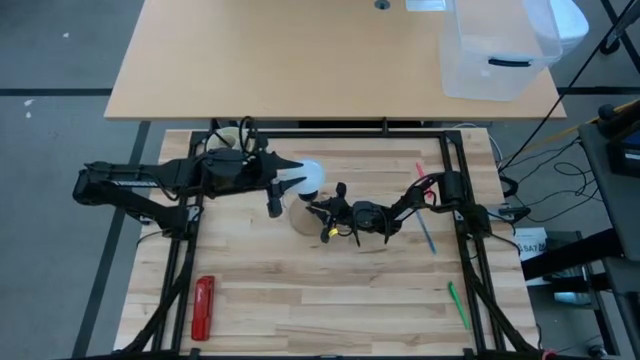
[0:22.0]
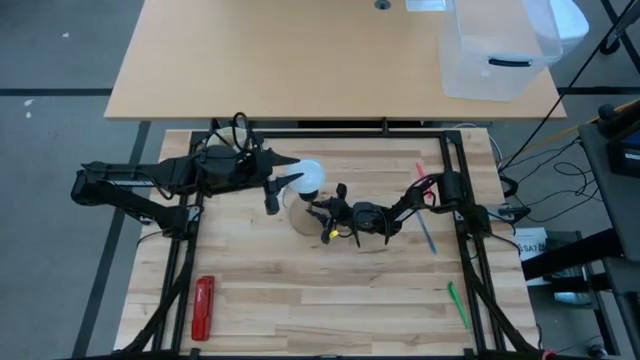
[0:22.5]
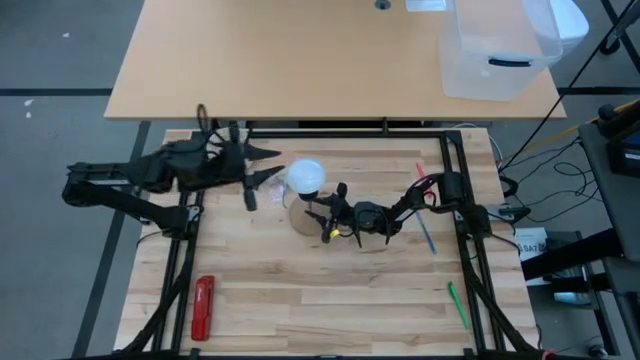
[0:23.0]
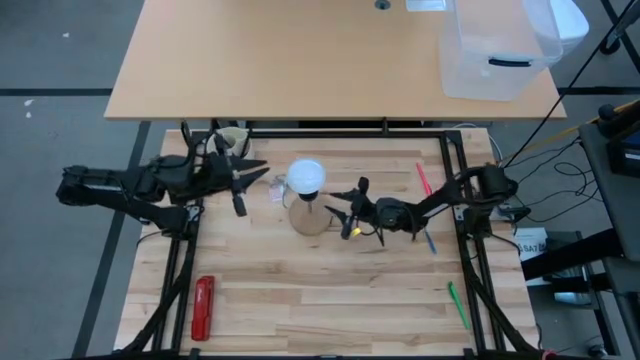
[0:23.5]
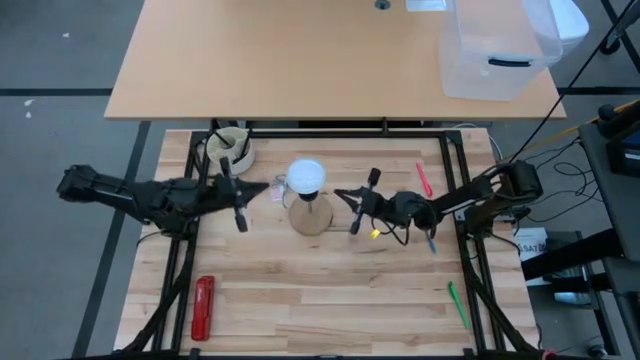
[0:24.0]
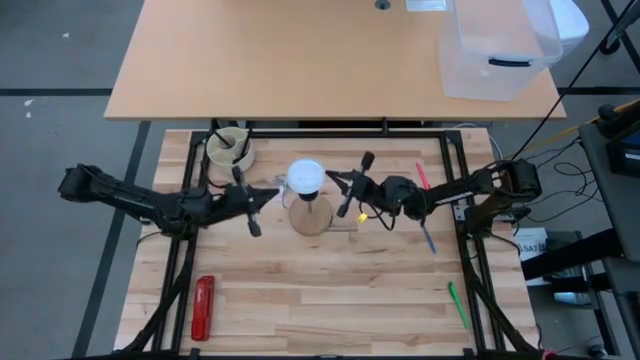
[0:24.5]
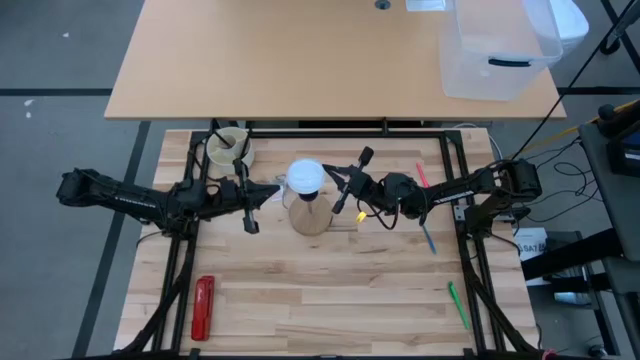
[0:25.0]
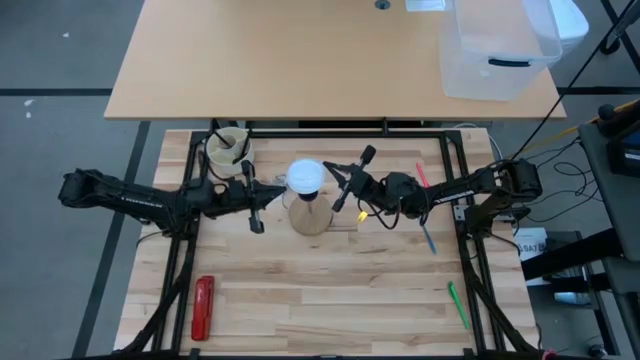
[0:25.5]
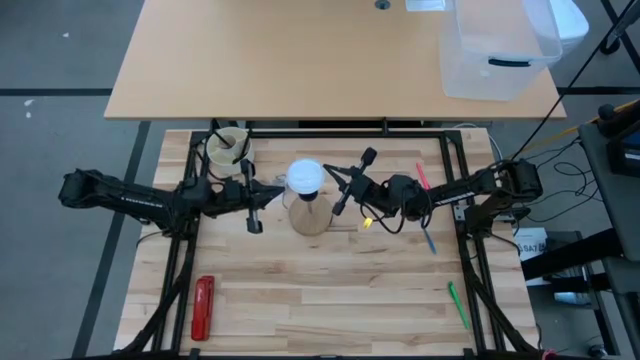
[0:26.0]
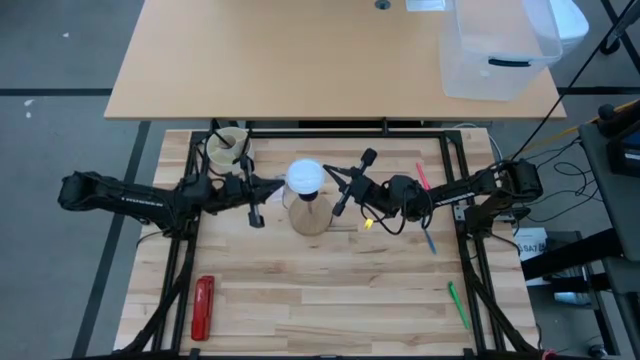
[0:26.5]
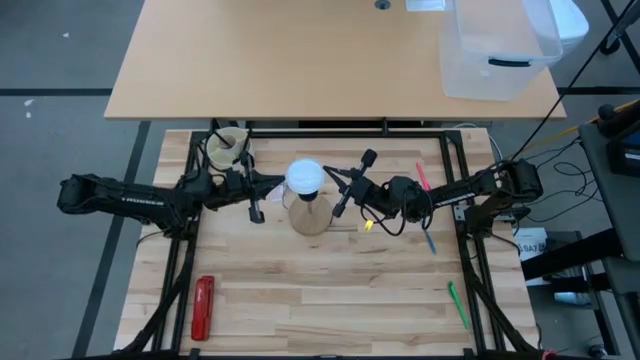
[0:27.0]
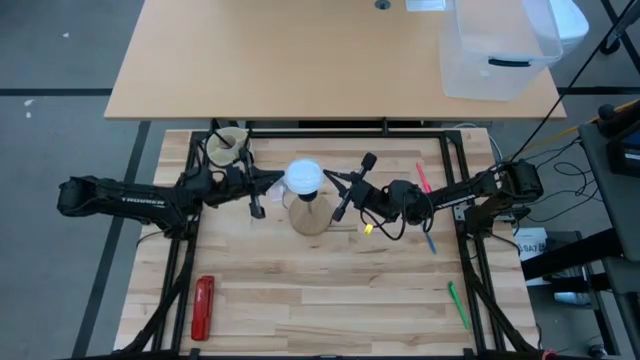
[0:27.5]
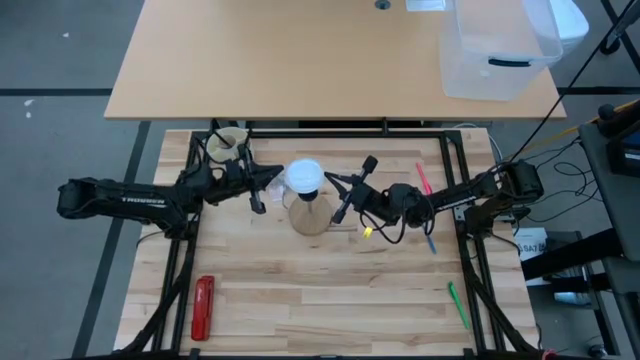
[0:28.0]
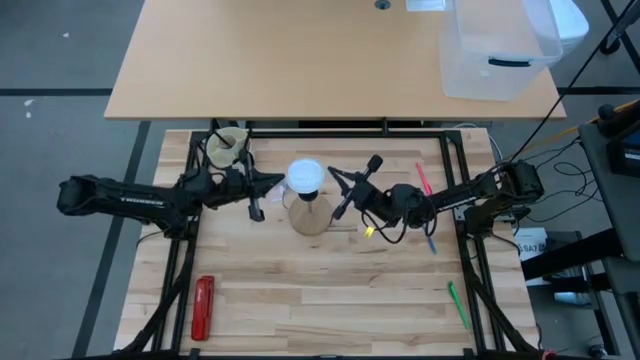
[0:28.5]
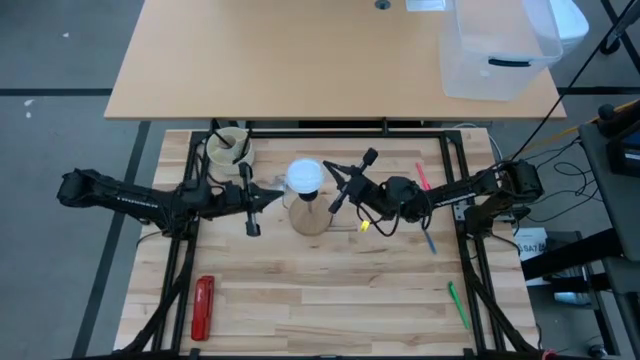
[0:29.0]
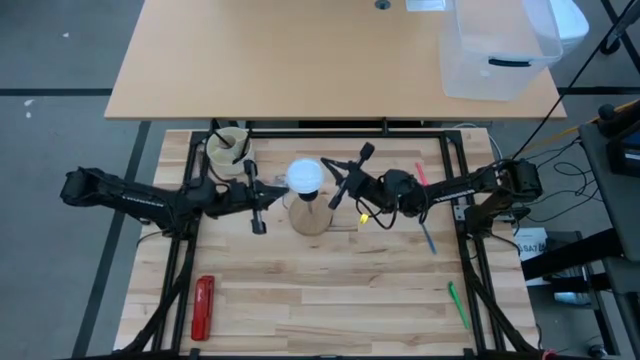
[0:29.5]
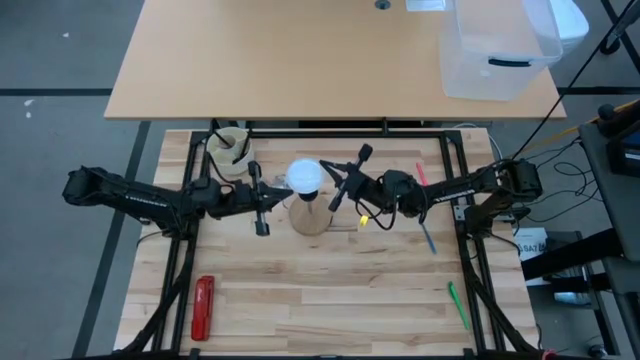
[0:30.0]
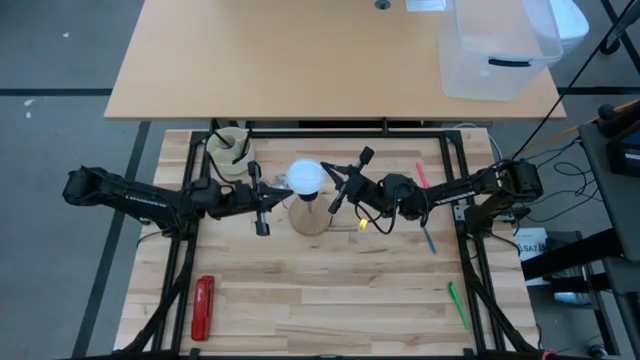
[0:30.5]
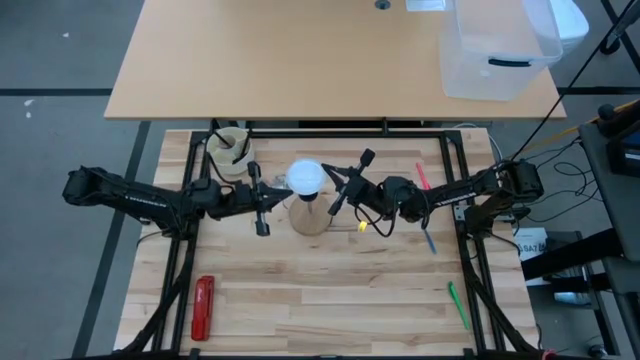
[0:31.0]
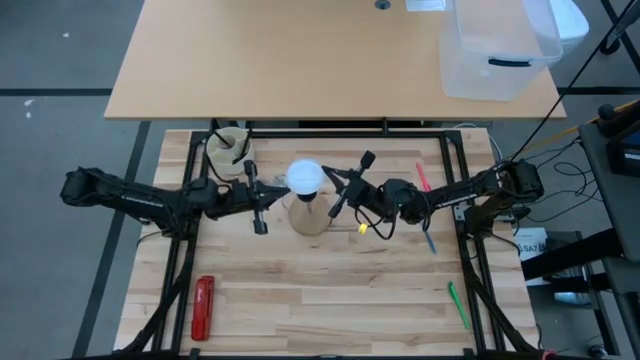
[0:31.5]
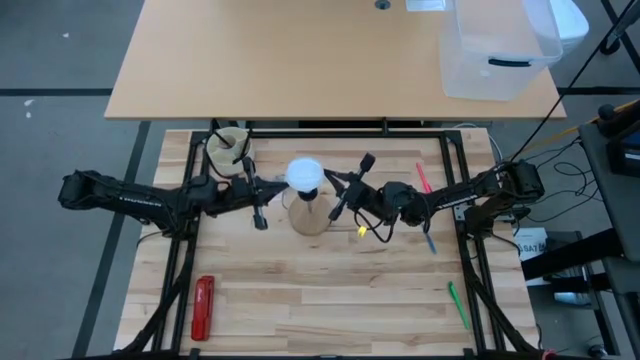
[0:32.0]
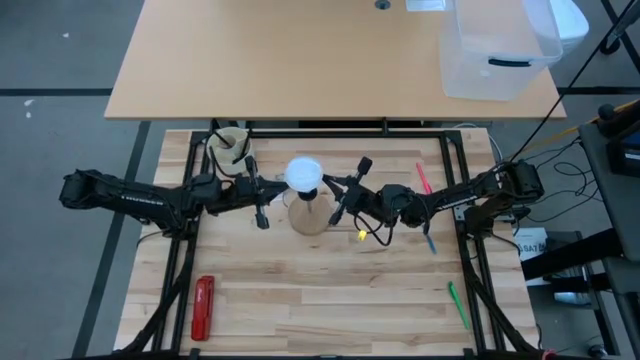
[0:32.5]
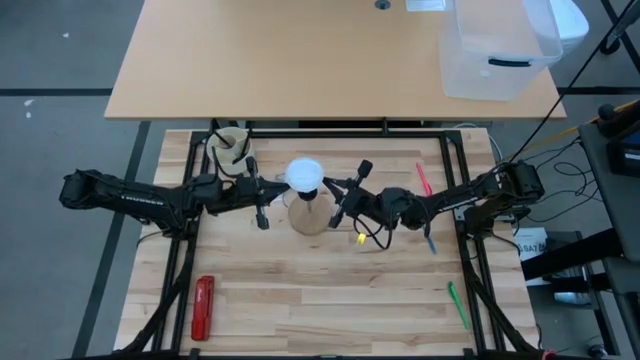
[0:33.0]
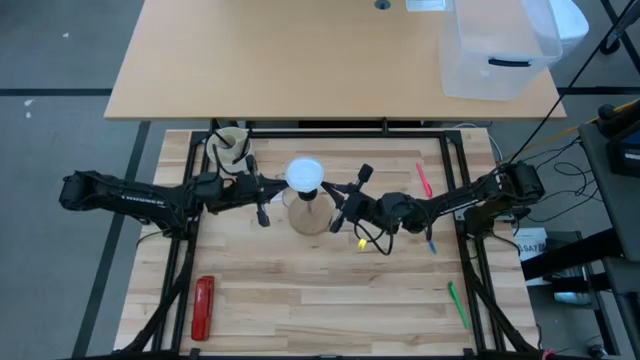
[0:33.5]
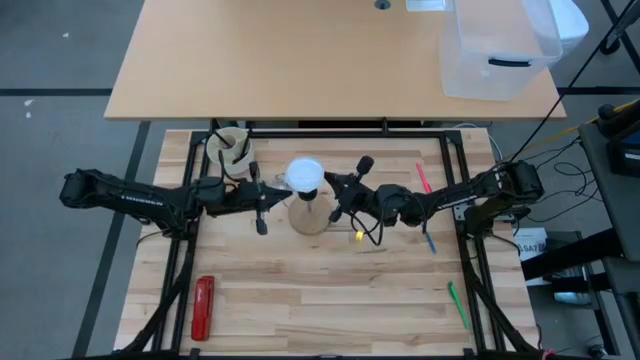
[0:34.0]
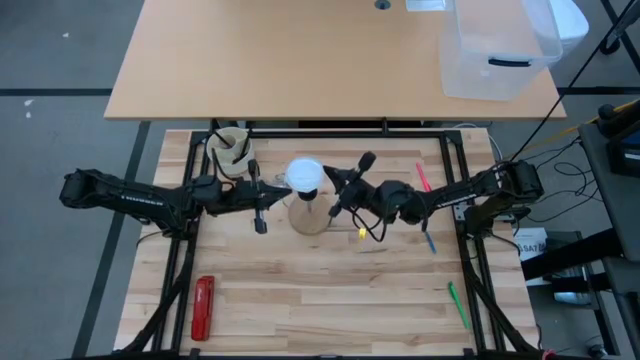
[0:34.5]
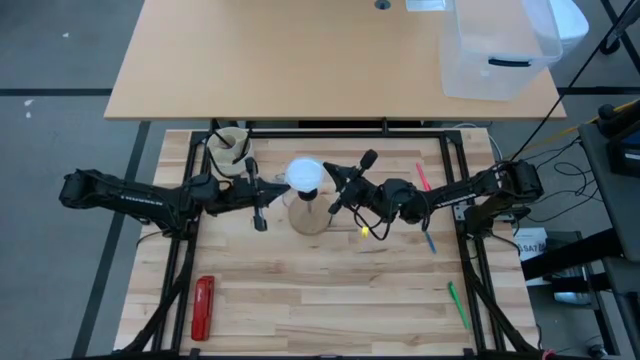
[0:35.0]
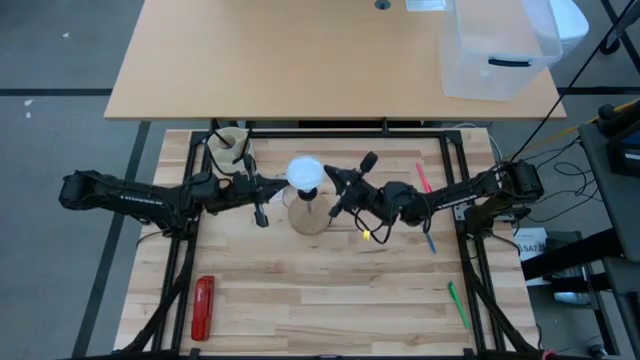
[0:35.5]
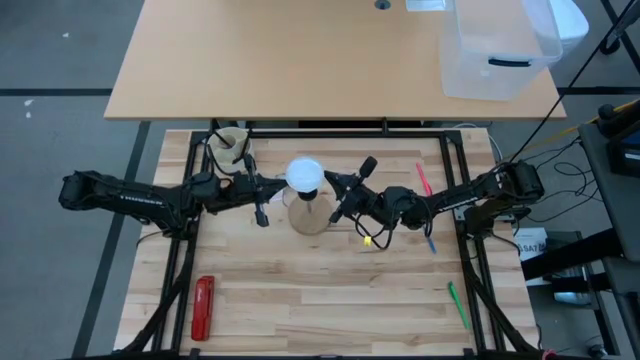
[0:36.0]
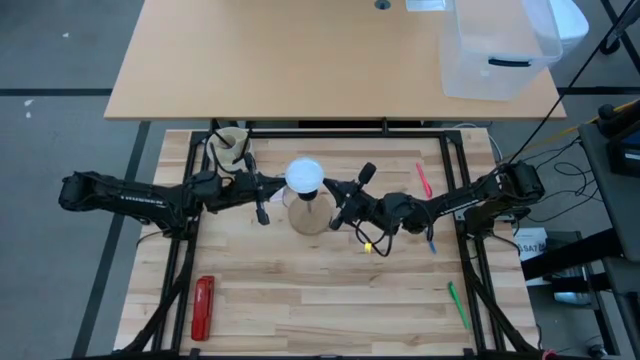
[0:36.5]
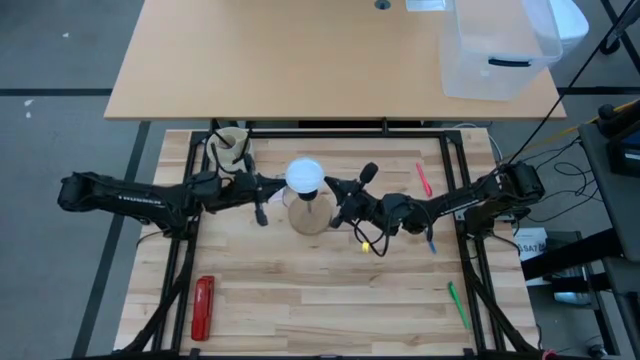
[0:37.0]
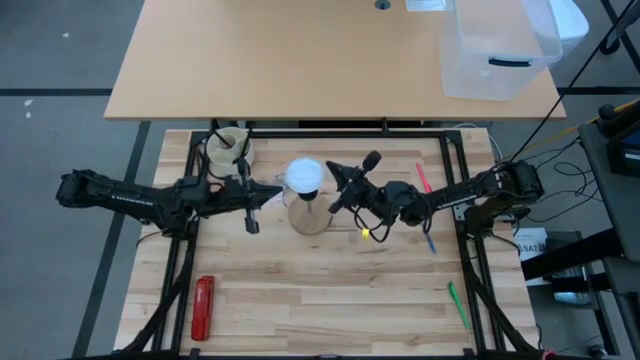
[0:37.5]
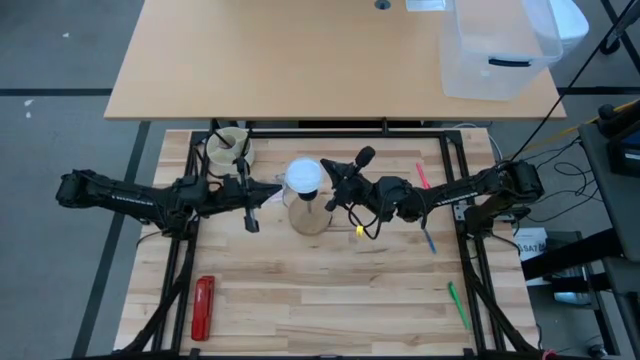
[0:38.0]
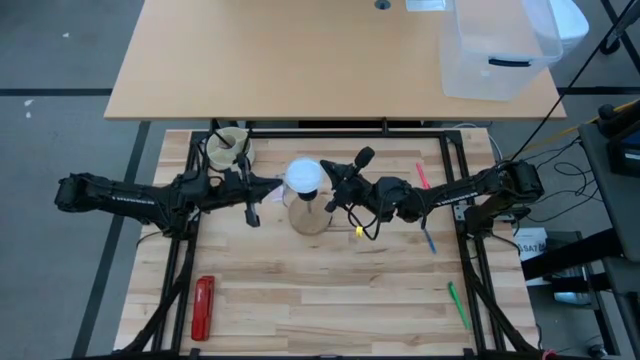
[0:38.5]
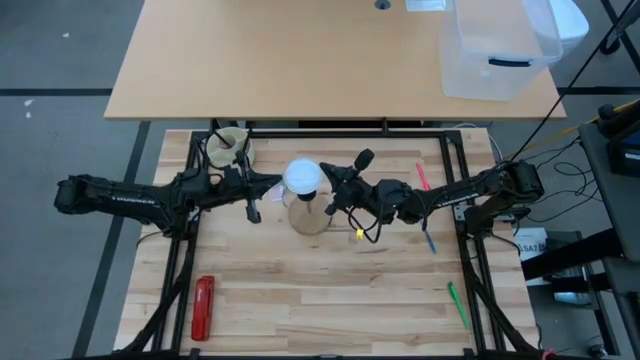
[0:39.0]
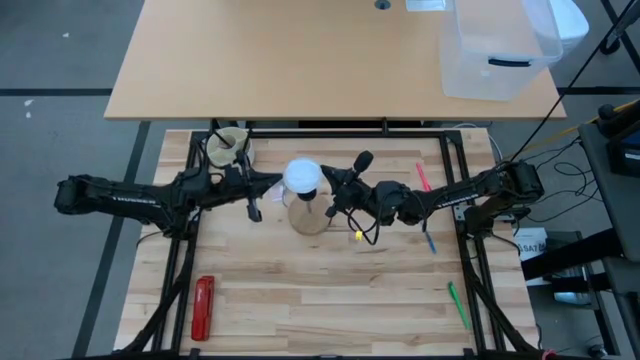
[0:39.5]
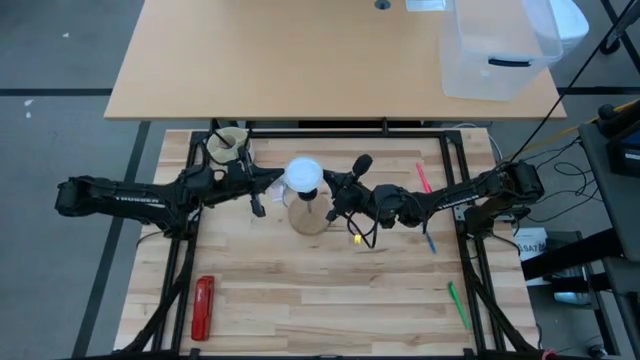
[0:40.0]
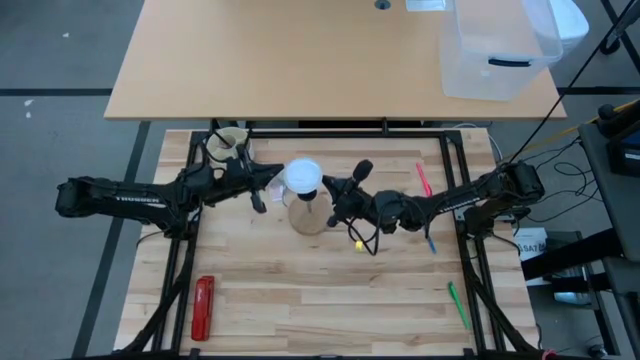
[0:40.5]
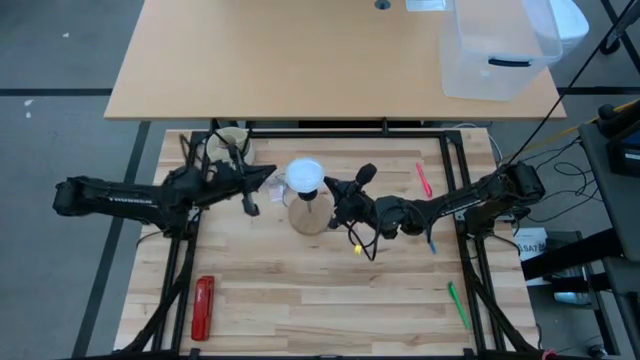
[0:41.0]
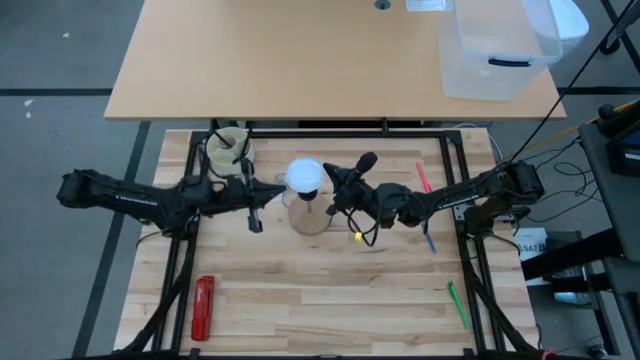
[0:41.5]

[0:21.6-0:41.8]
Task: Screw lightbulb
Insert the lightbulb into the desk lamp
